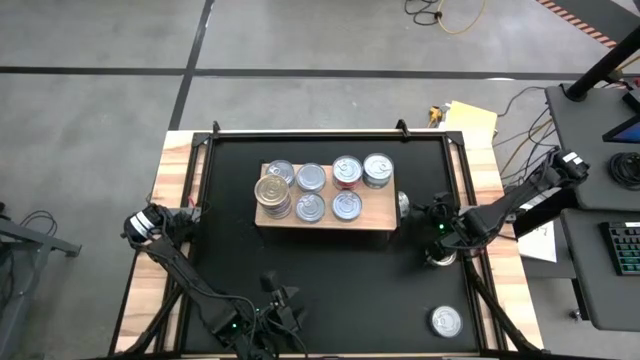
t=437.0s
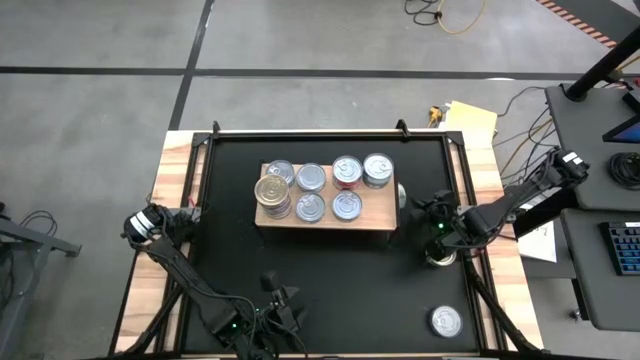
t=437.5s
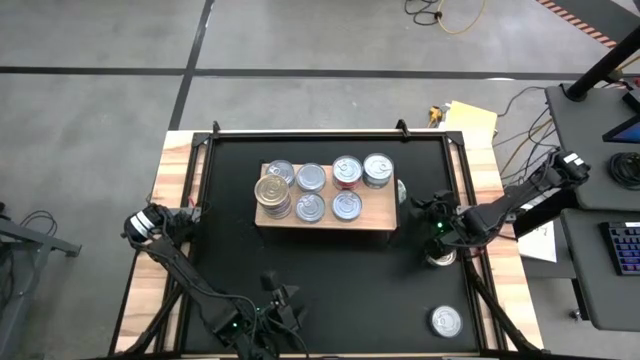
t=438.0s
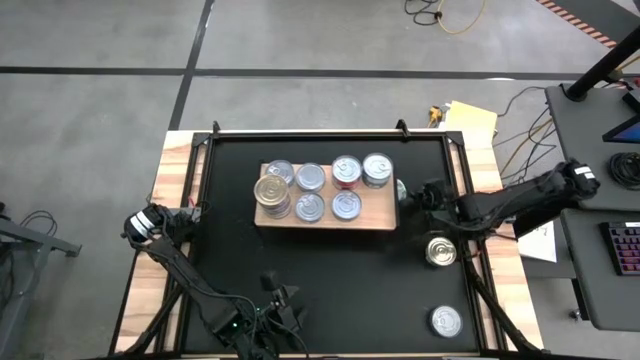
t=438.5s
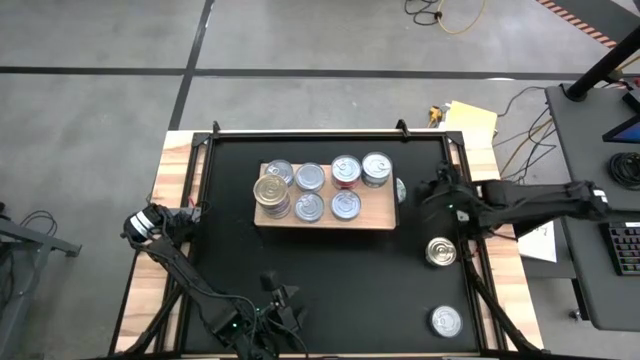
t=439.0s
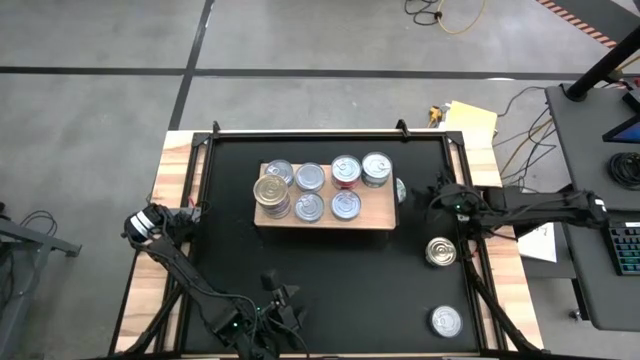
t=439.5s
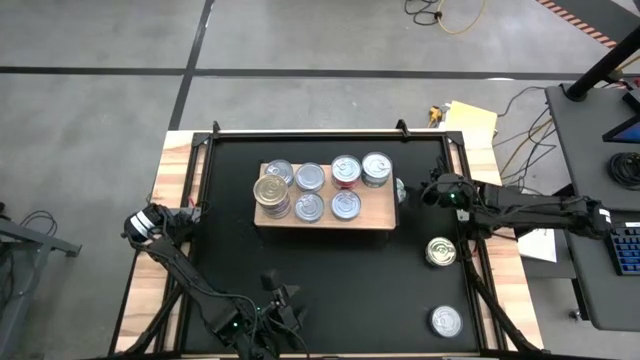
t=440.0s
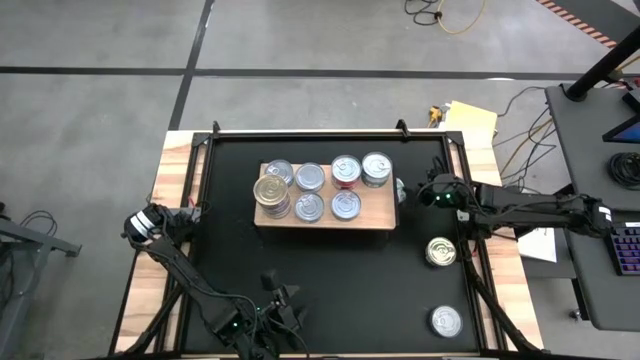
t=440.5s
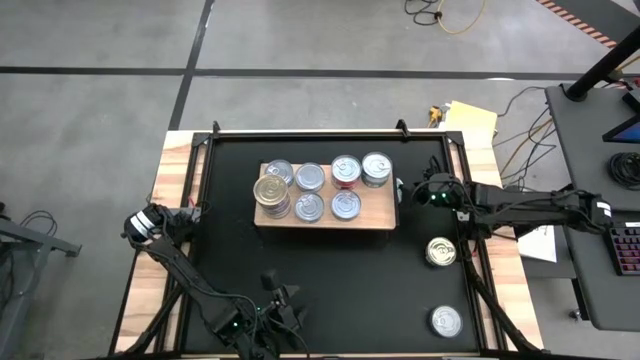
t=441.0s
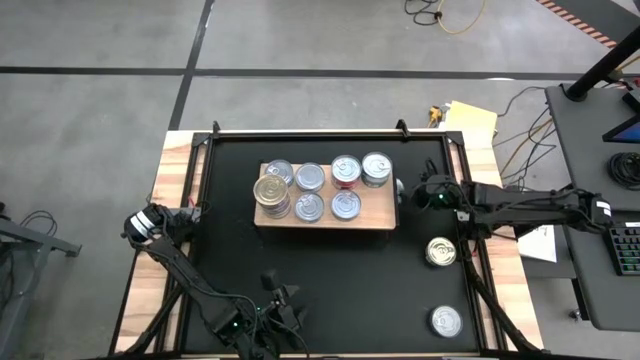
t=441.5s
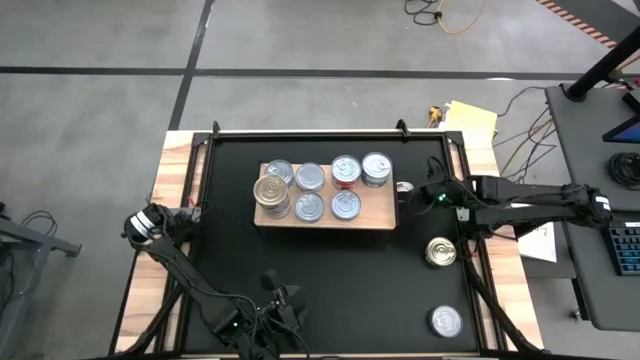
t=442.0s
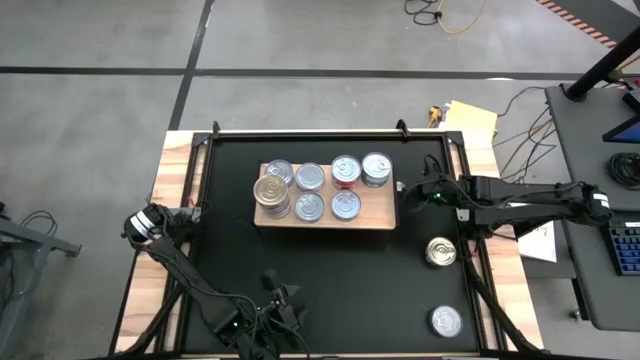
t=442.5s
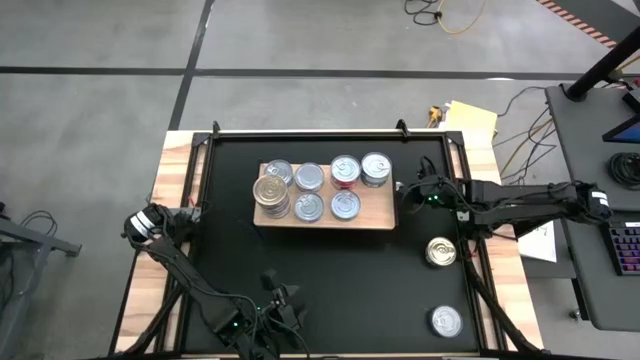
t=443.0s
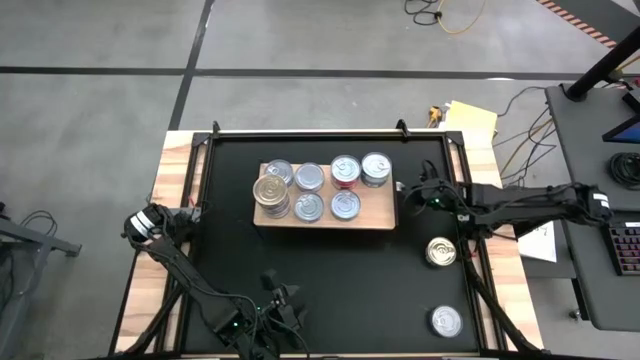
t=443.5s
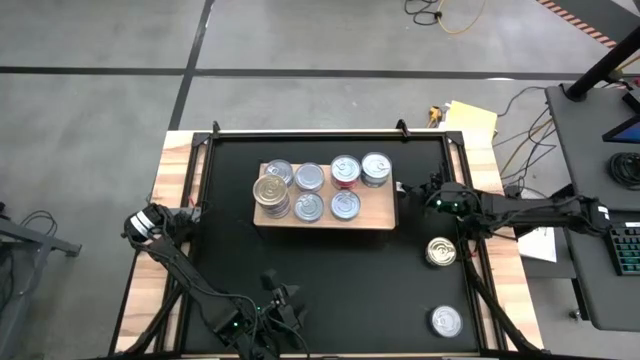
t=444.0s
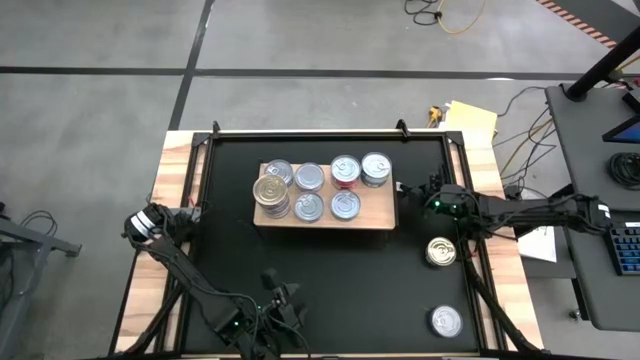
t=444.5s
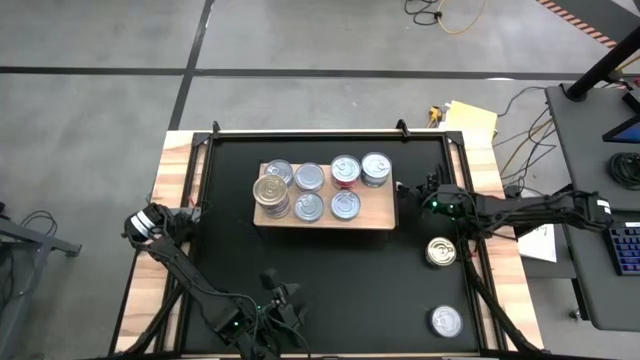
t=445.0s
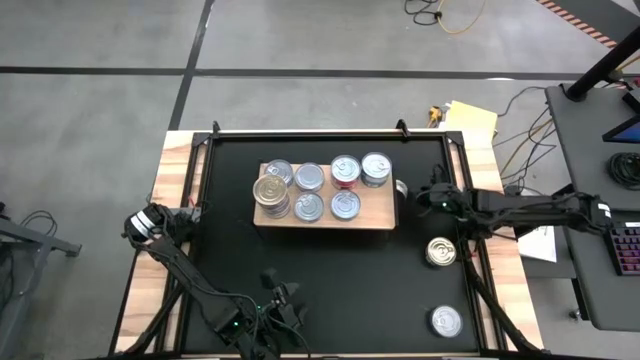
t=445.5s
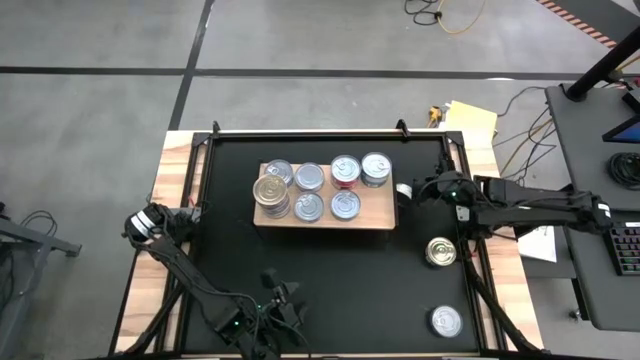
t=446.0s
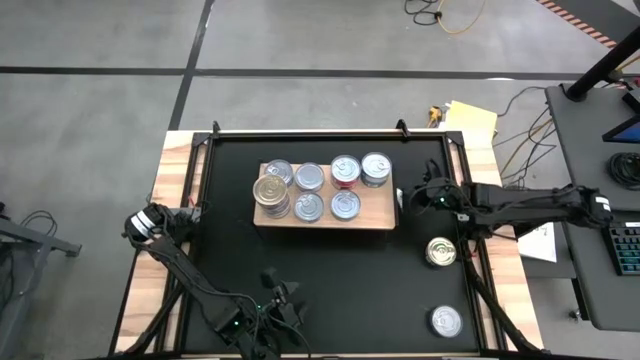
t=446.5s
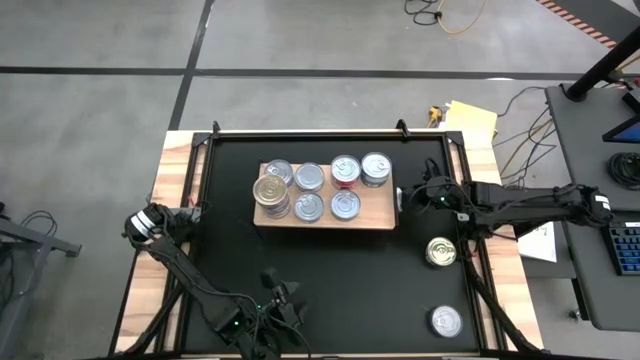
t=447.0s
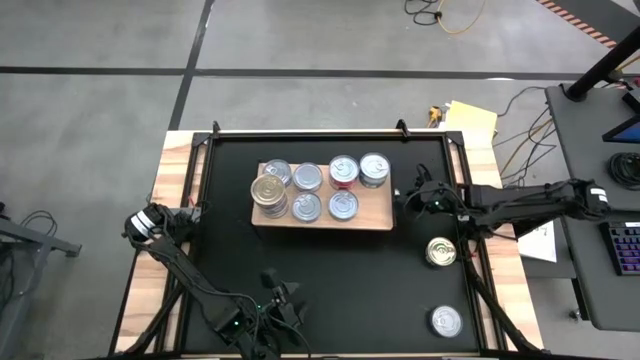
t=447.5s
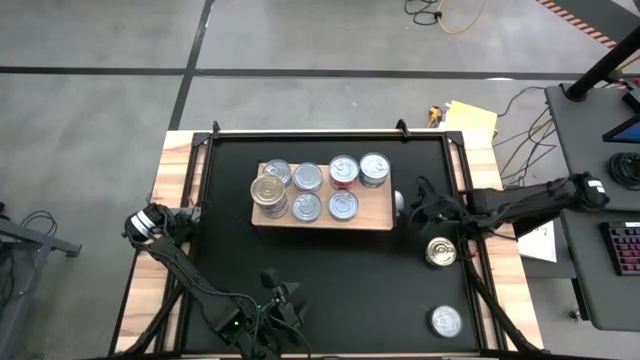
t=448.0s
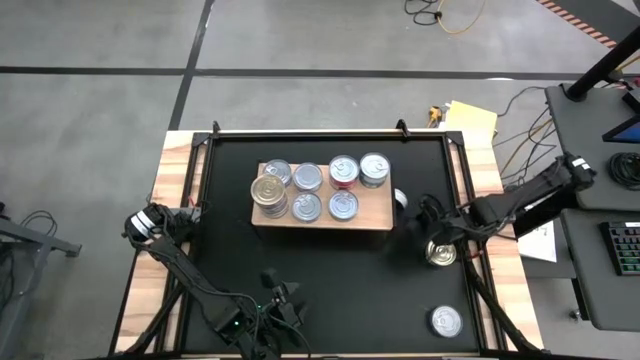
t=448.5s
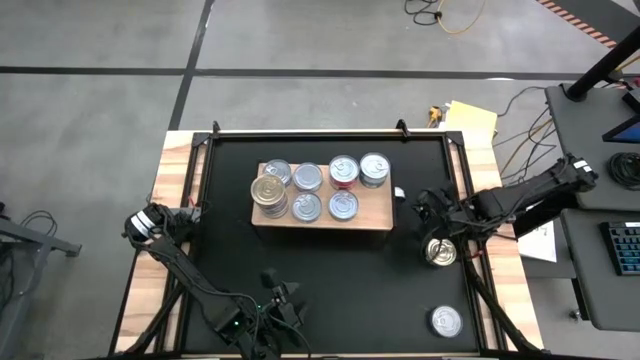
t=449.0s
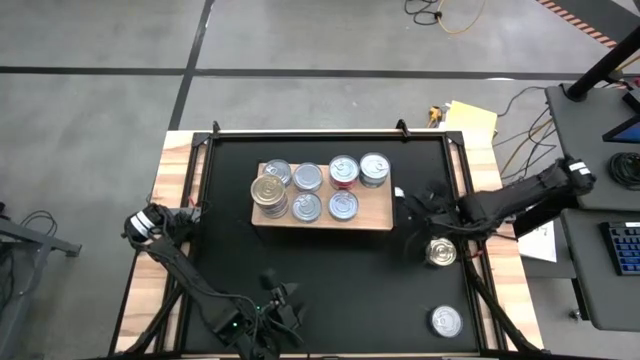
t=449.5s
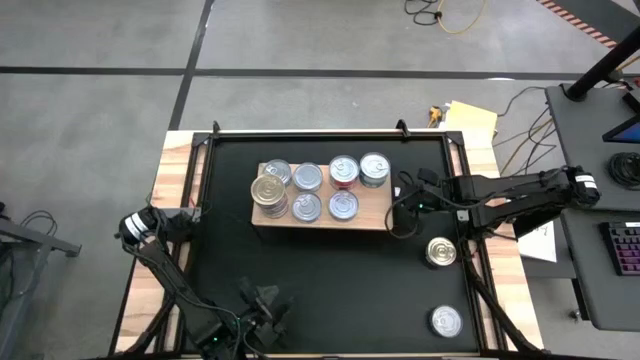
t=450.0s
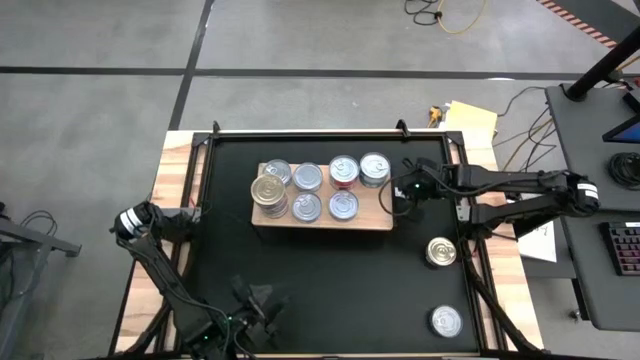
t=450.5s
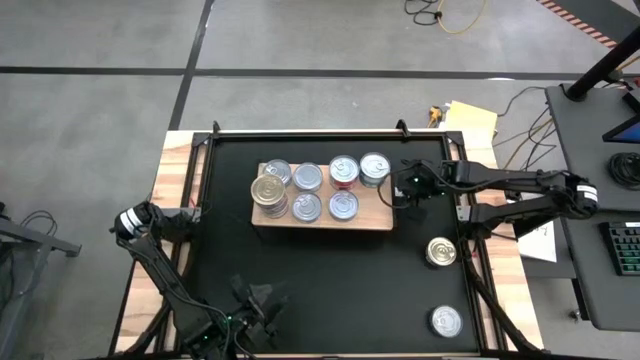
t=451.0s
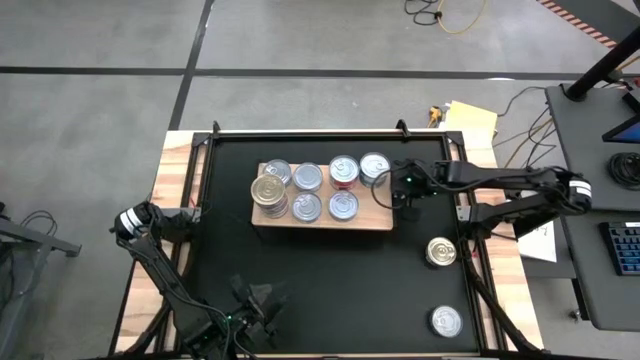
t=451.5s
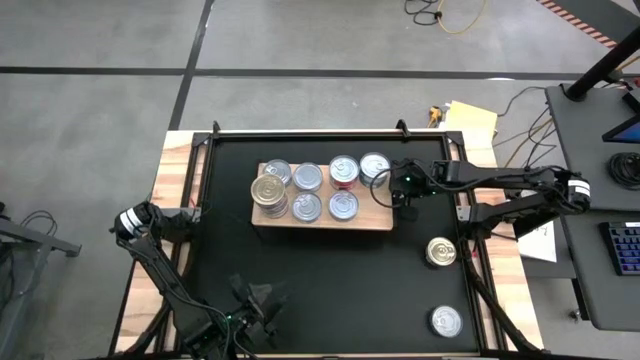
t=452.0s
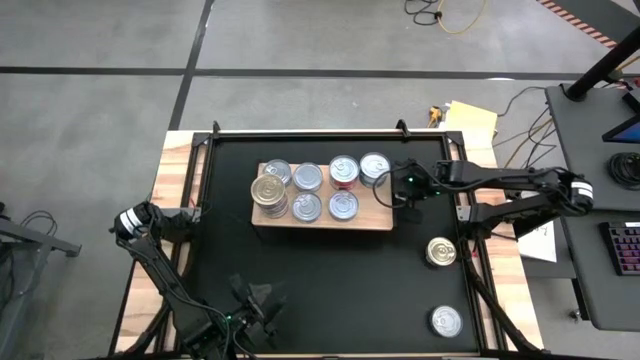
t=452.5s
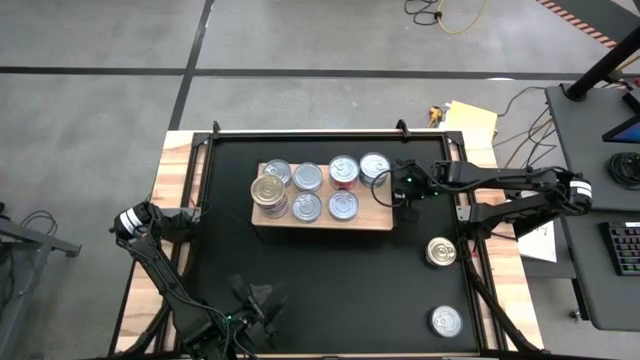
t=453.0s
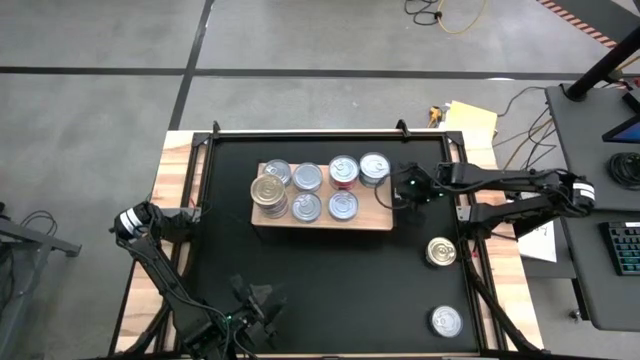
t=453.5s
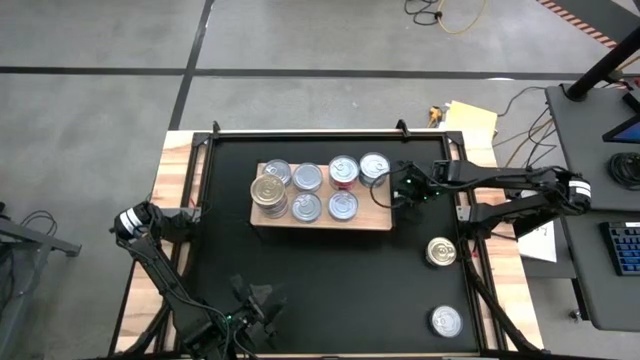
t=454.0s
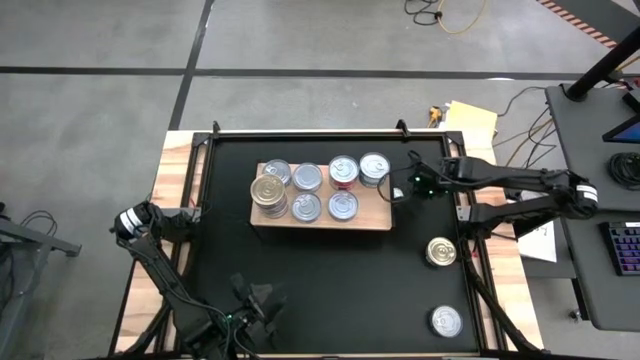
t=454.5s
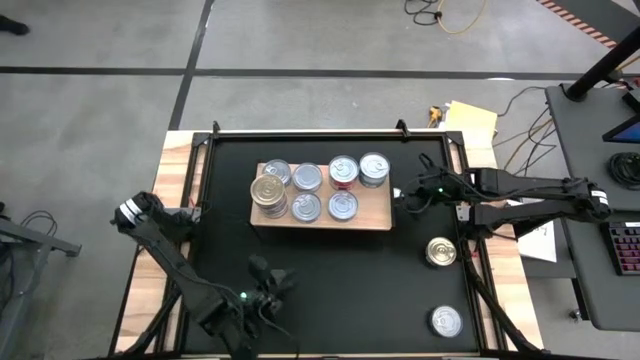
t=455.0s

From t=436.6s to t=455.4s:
Task: Stack canned seafood by type on shelf
Stack the green tuna can on the green tuna can
